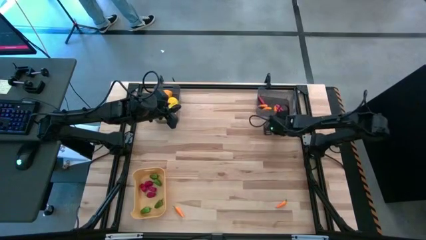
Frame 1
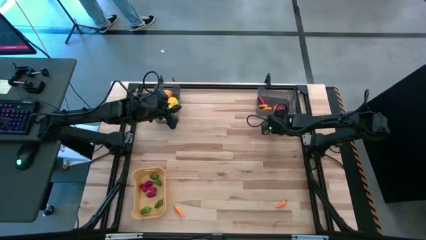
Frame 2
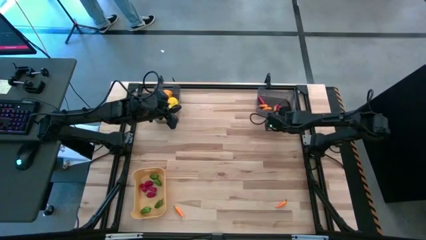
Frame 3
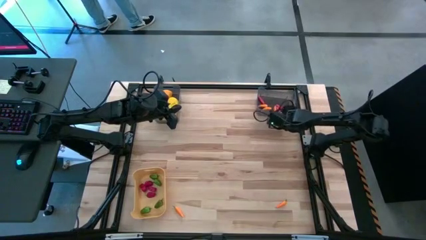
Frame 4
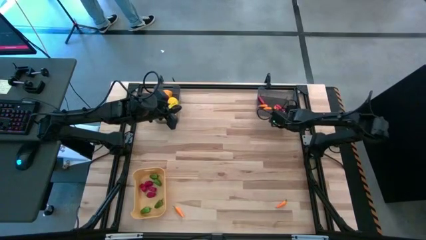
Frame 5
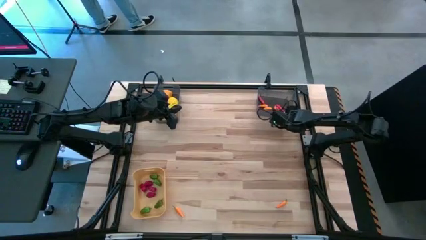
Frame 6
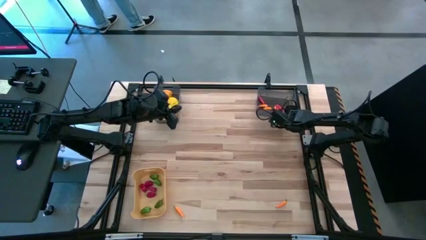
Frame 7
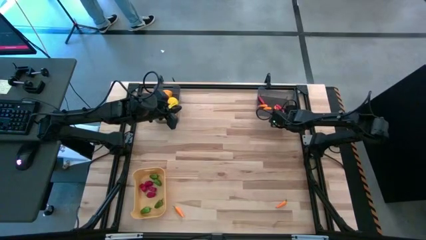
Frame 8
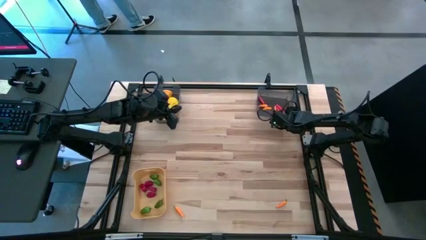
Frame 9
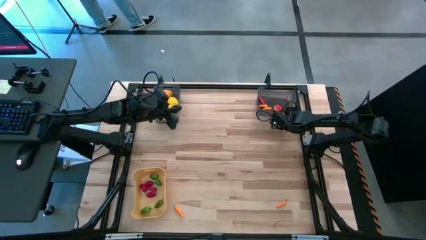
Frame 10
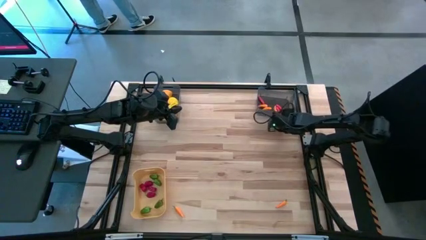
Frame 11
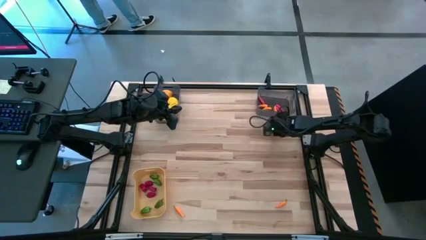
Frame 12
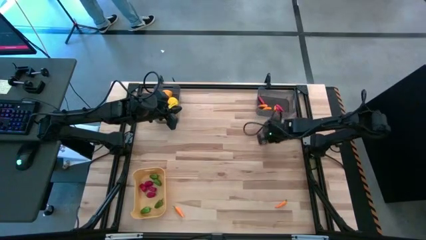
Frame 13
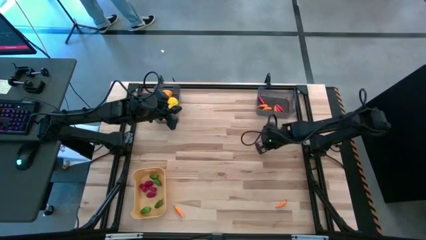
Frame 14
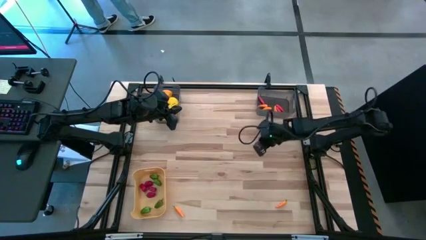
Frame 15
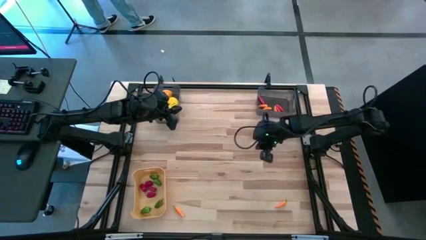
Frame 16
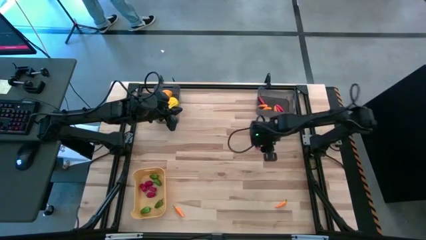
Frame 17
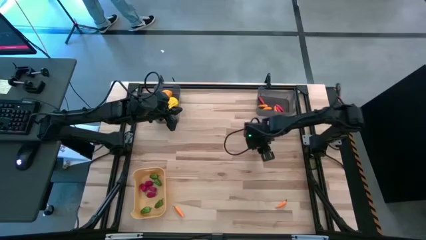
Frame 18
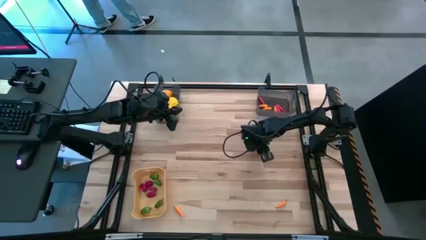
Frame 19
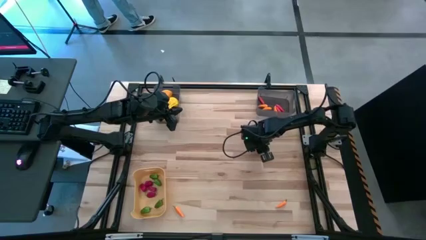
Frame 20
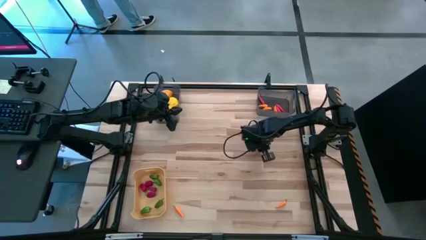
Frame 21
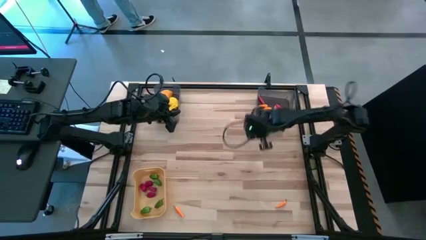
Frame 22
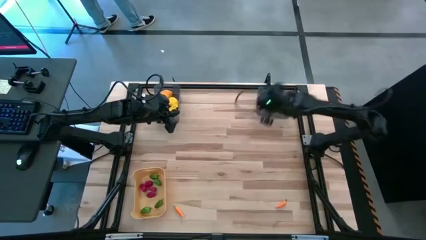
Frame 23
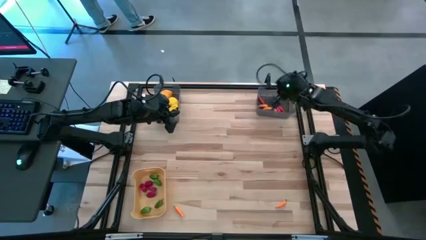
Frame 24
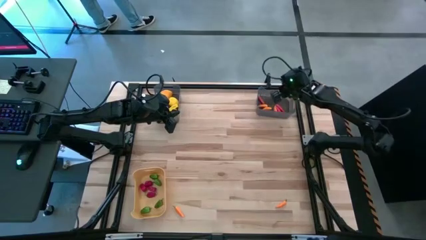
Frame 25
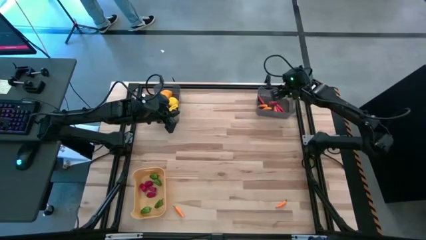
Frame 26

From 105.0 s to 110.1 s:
Task: Sort produce into baskets
Put the red chili into the right black bin

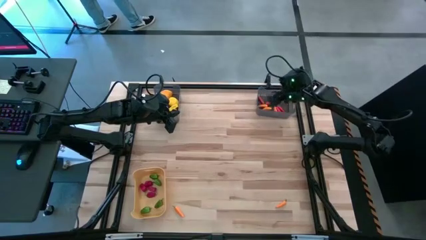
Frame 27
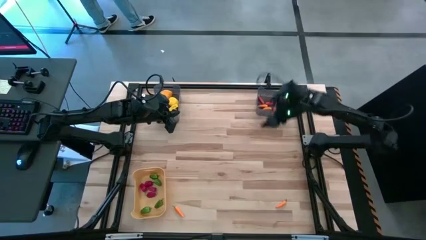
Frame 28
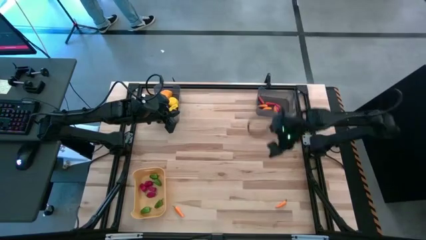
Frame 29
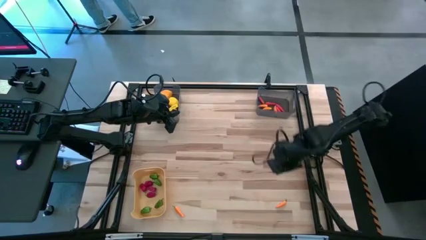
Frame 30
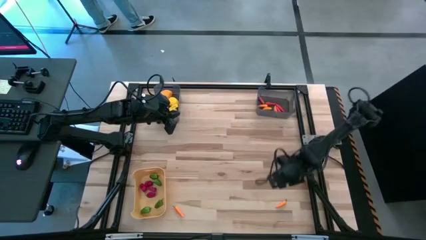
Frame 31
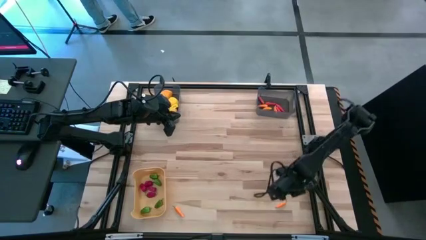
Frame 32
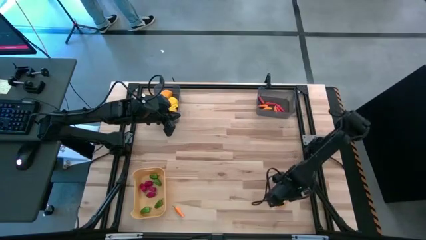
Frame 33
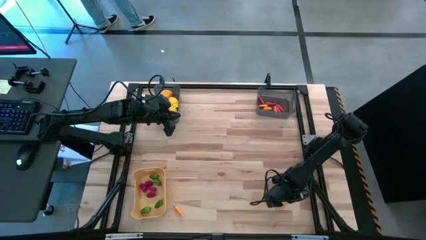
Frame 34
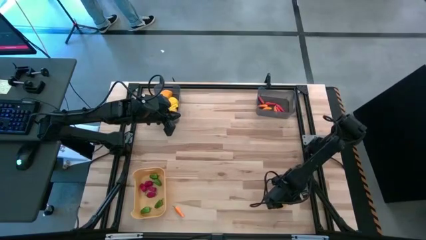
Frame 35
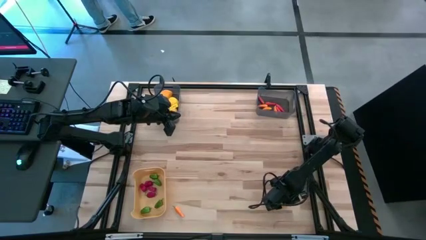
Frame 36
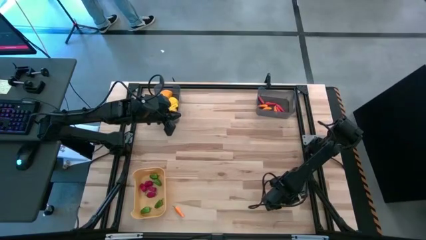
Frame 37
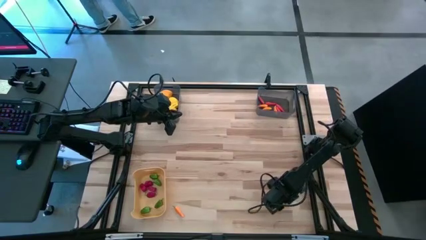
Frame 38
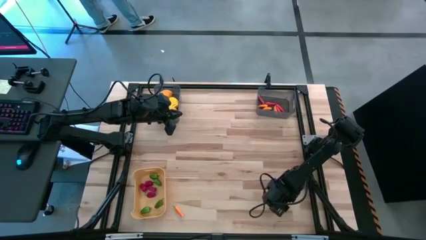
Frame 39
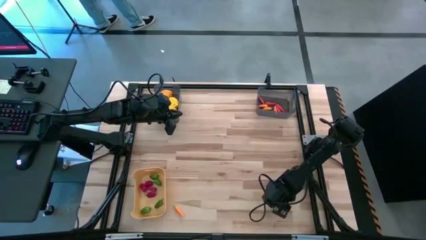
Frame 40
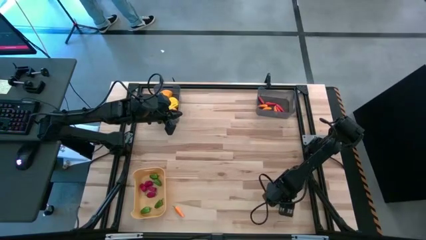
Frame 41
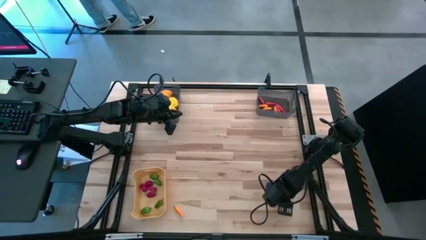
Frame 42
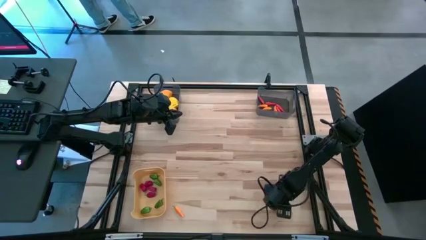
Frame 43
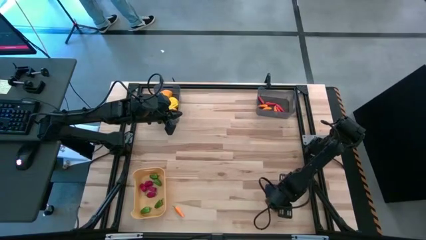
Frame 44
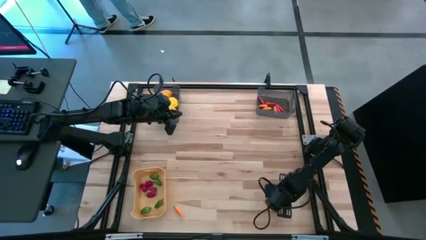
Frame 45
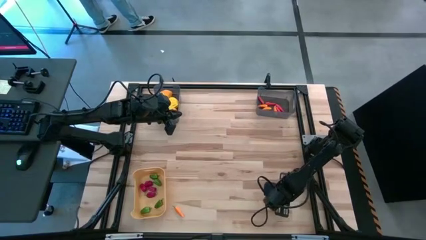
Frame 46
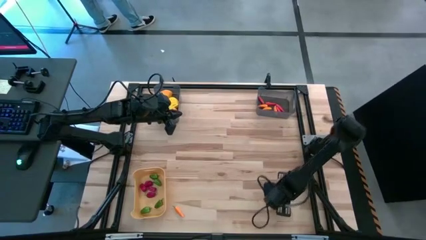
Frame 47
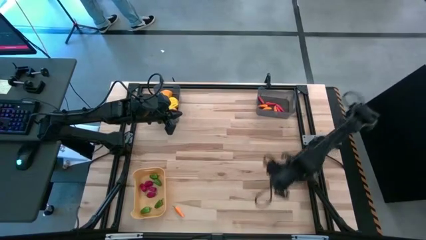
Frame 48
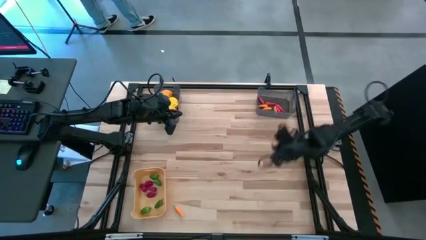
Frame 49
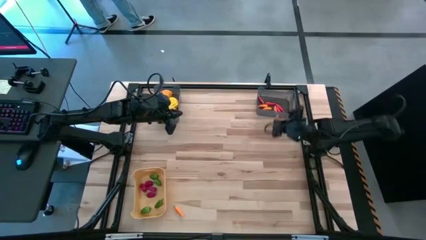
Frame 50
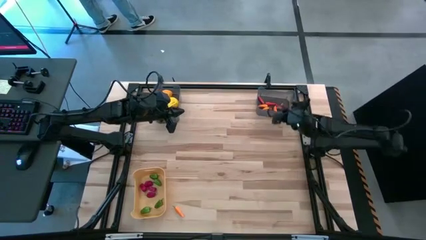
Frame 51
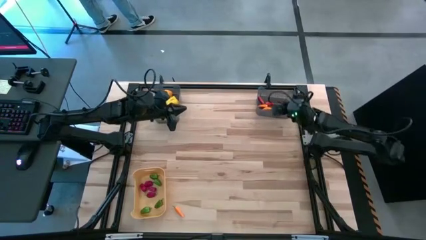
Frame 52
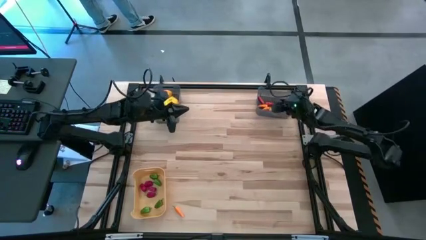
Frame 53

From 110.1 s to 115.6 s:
Put the right yellow chili into the right black bin

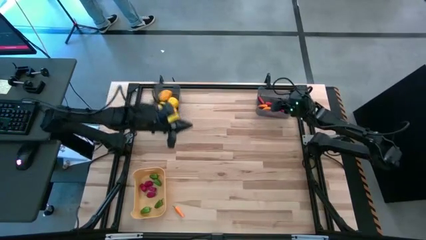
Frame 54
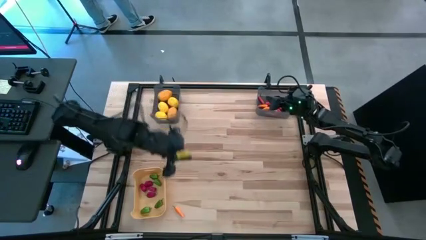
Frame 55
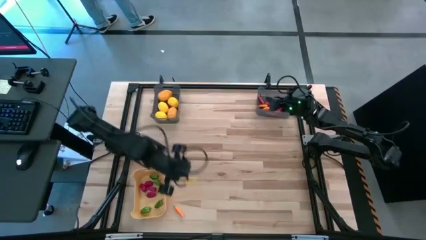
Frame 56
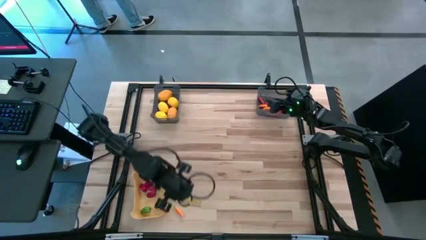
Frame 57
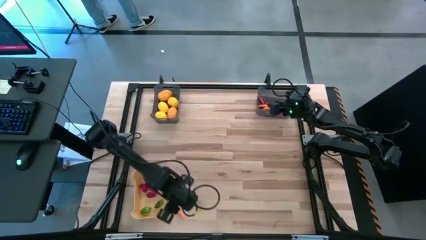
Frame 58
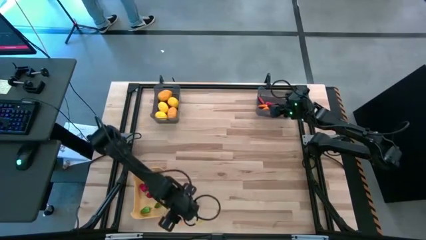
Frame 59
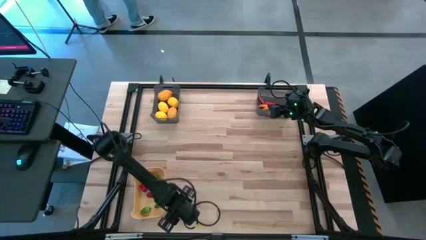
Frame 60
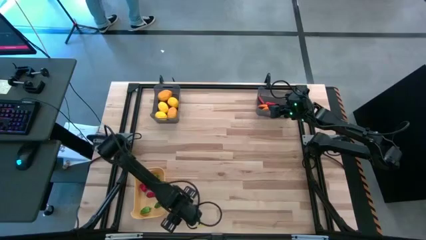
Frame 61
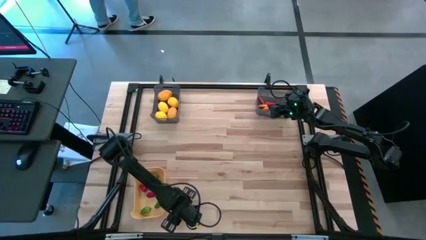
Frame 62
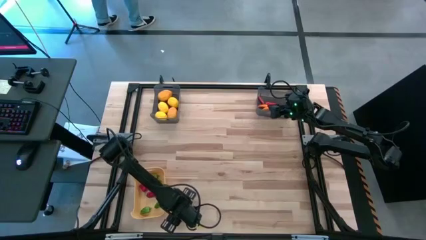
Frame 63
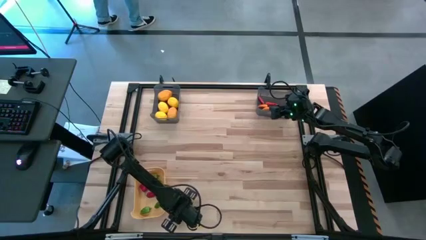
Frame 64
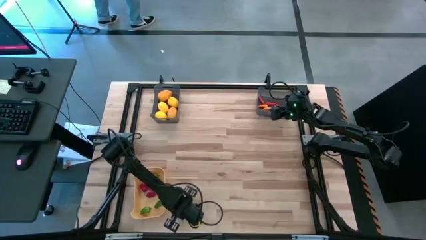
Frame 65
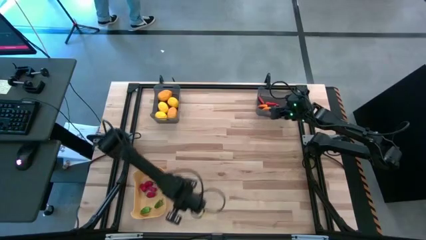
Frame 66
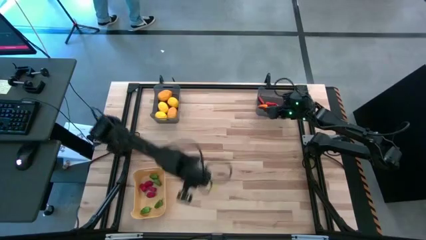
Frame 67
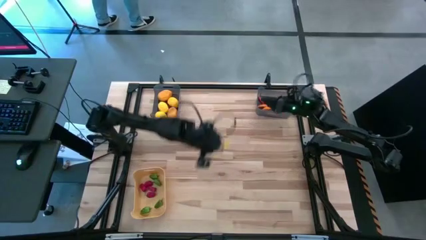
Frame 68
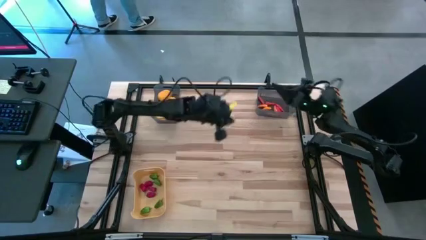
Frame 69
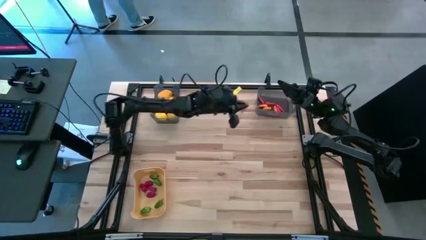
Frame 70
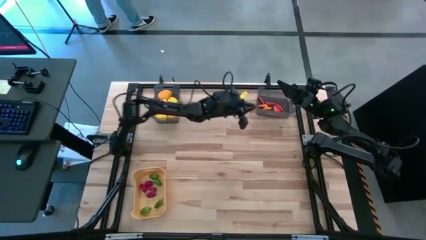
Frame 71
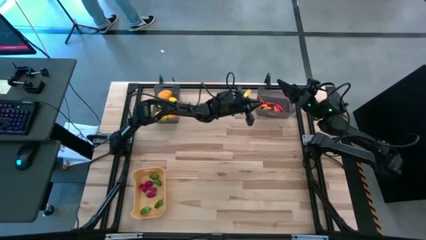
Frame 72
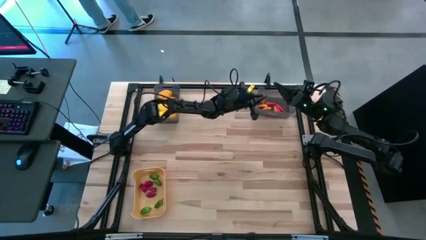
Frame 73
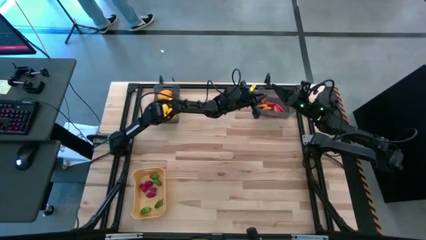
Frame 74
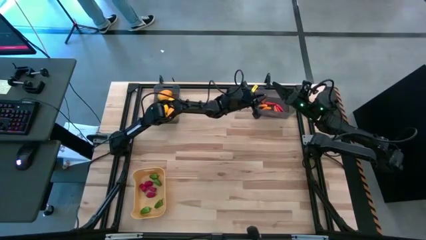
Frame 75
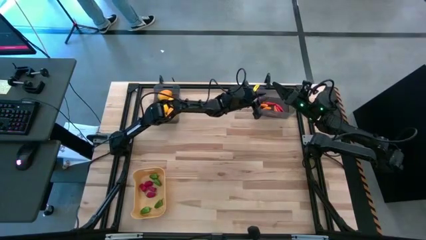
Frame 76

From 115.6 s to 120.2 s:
Put the yellow chili into the right black bin

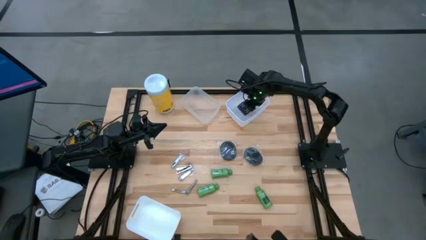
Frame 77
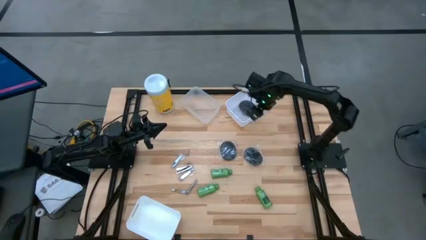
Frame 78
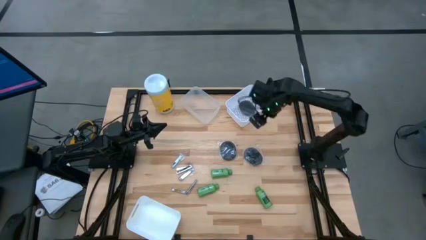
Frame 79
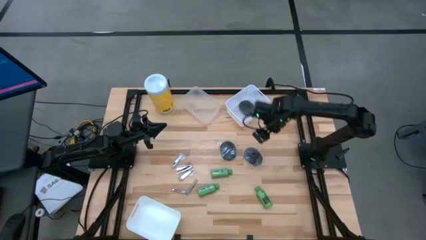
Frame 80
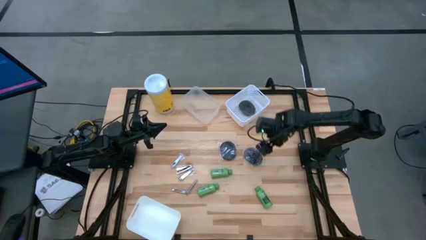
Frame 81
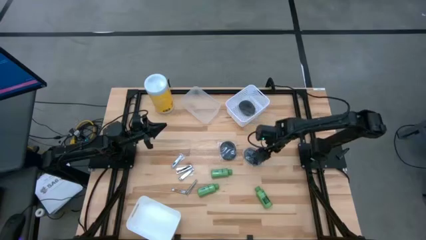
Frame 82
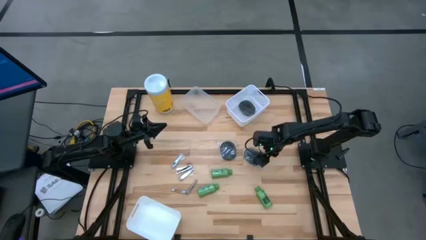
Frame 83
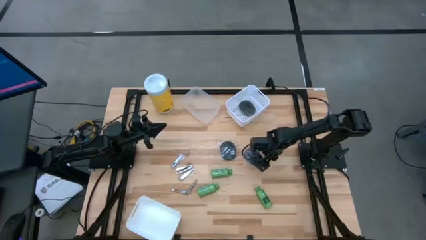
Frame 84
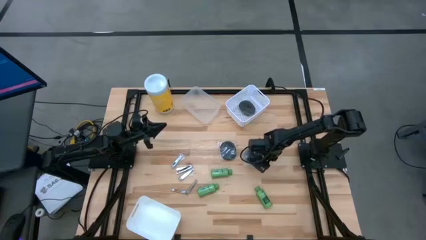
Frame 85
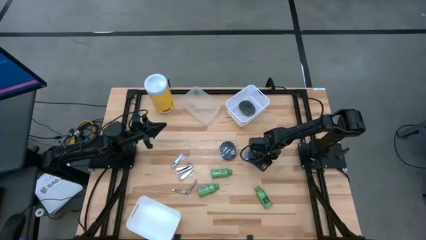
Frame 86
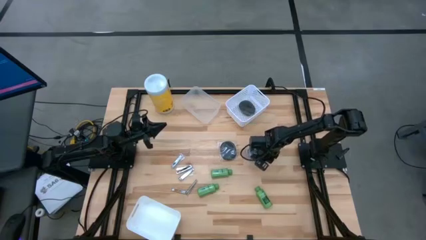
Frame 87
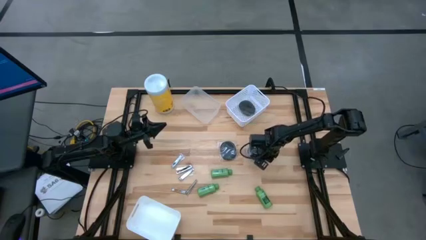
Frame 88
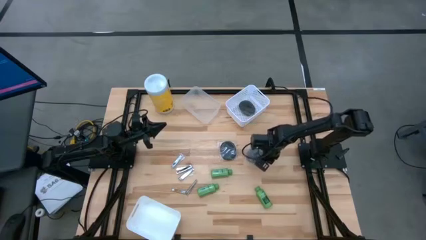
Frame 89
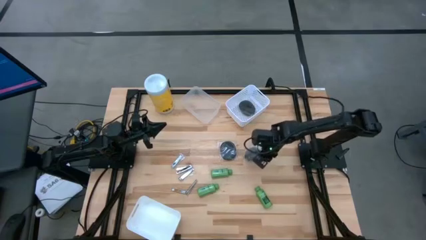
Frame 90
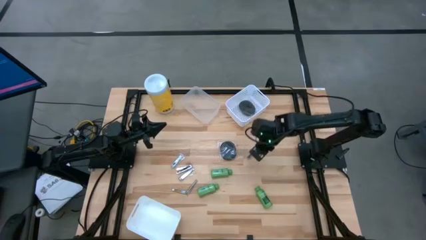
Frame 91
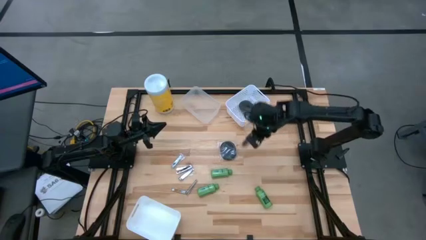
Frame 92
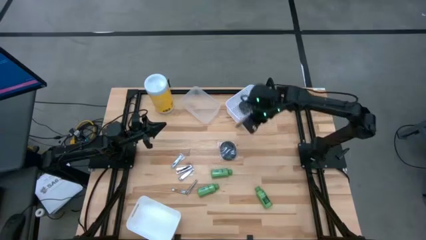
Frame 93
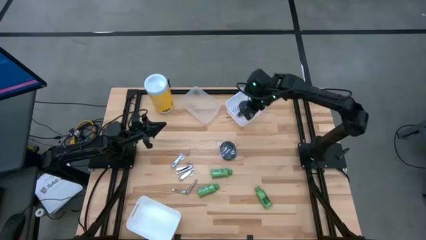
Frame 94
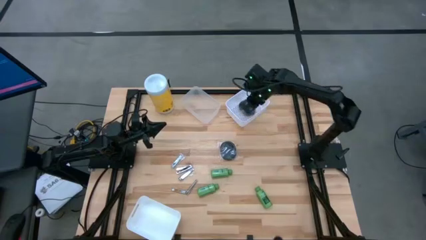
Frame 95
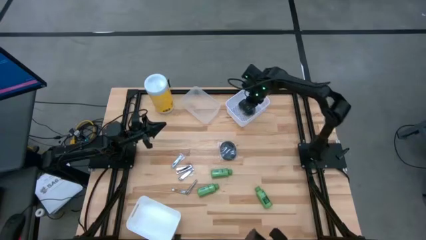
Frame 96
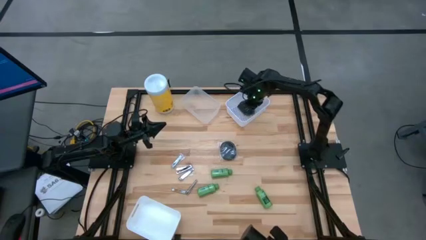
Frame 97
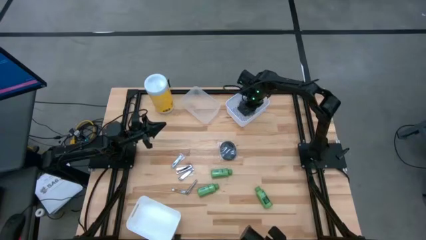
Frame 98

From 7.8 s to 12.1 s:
Task: Pick & Place Travel size toiletries
Put the black hairbrush into the top white bin
